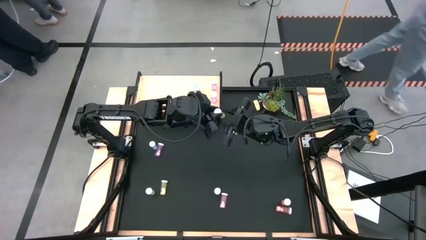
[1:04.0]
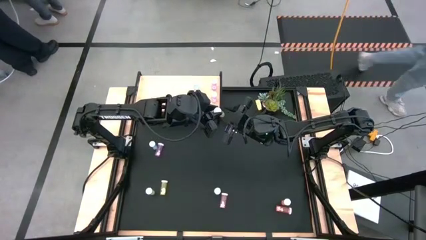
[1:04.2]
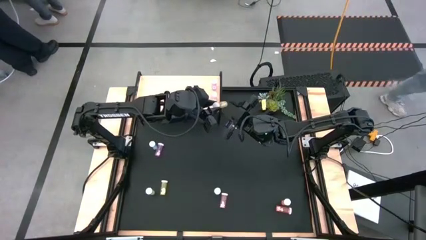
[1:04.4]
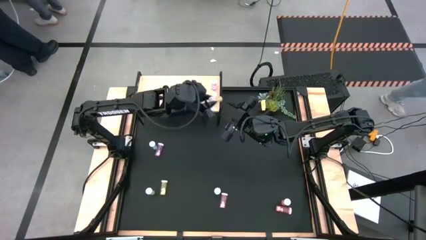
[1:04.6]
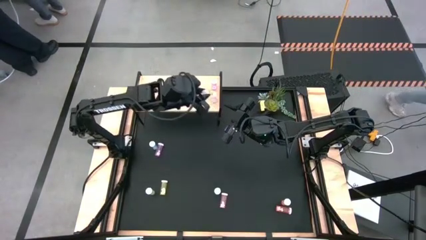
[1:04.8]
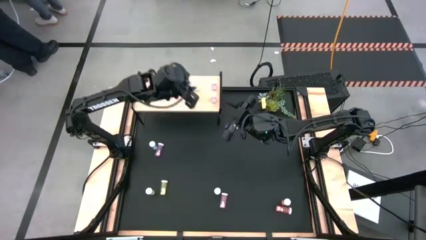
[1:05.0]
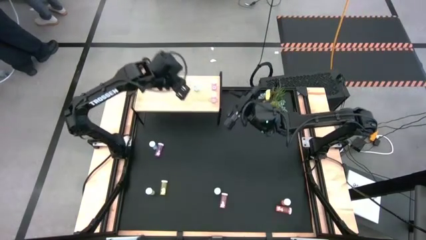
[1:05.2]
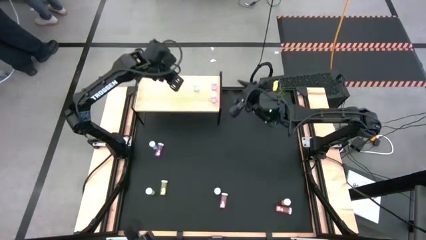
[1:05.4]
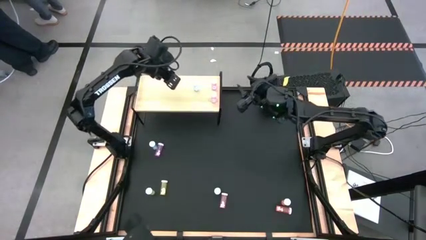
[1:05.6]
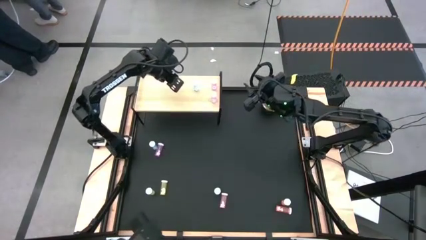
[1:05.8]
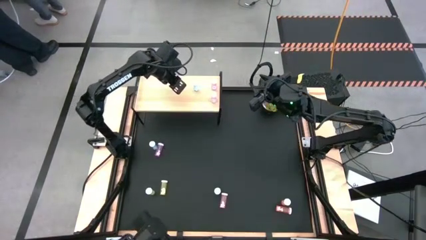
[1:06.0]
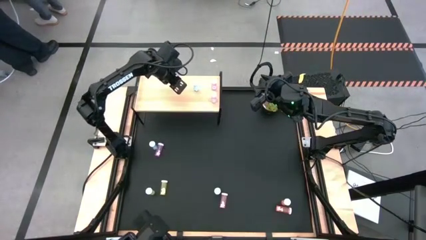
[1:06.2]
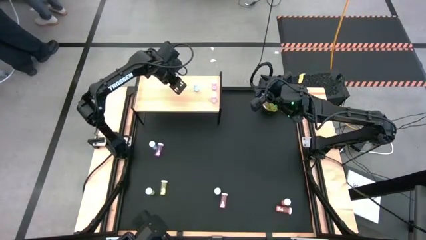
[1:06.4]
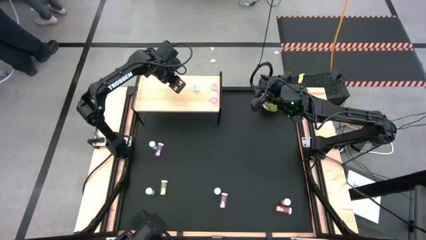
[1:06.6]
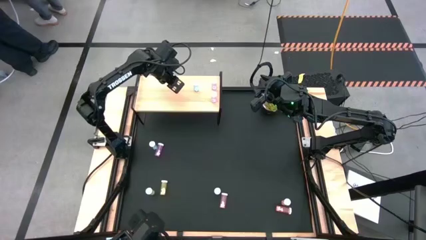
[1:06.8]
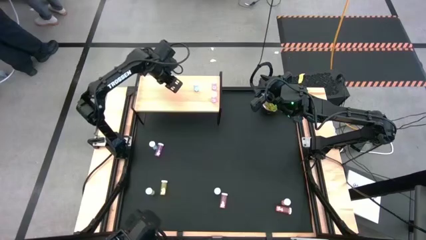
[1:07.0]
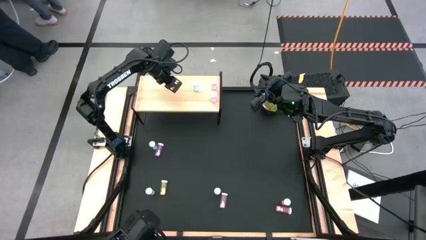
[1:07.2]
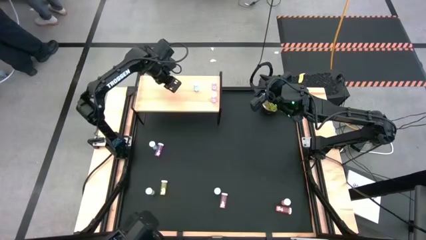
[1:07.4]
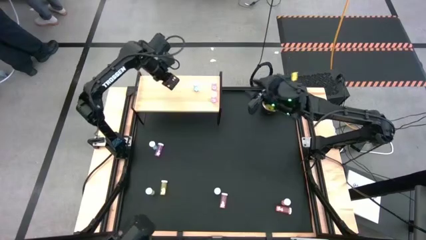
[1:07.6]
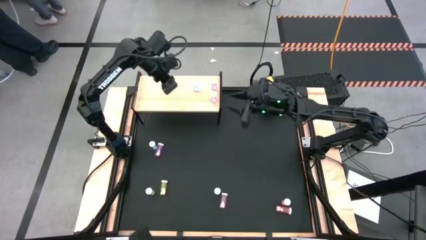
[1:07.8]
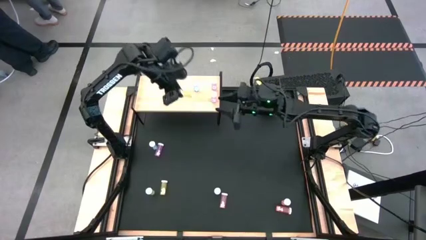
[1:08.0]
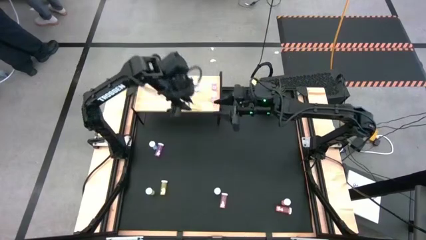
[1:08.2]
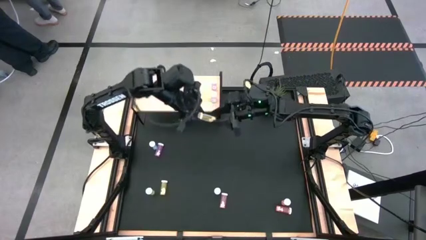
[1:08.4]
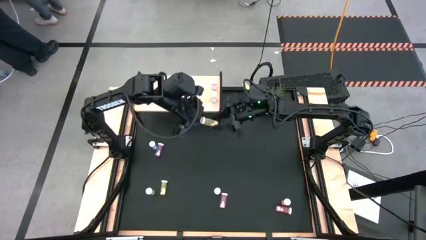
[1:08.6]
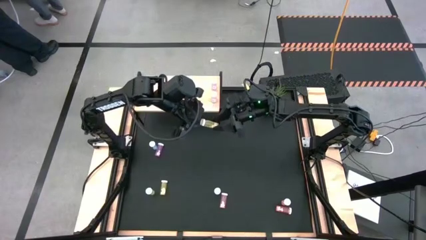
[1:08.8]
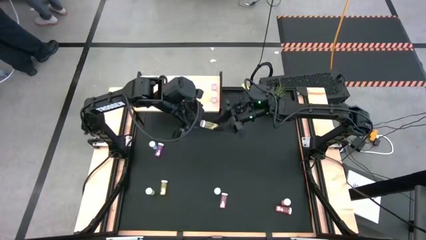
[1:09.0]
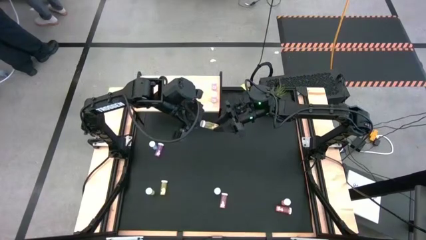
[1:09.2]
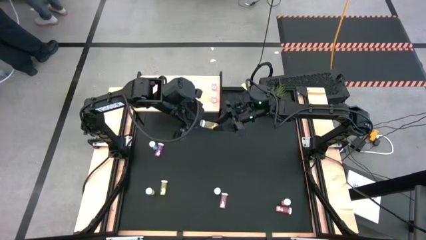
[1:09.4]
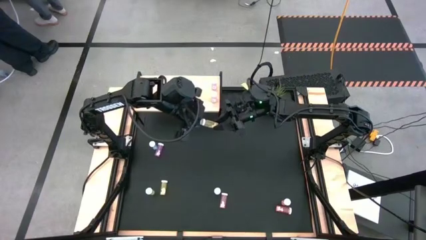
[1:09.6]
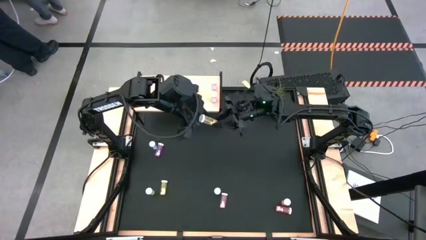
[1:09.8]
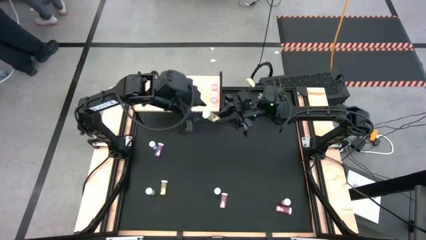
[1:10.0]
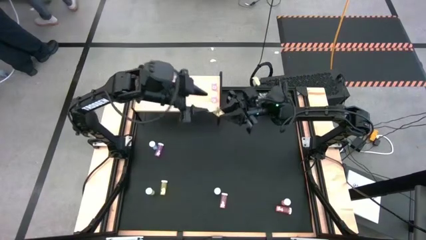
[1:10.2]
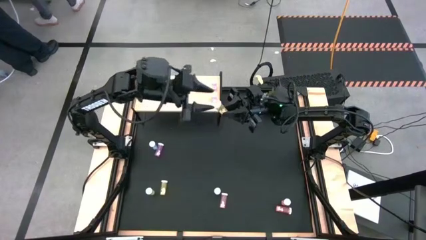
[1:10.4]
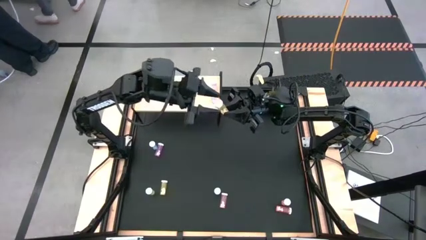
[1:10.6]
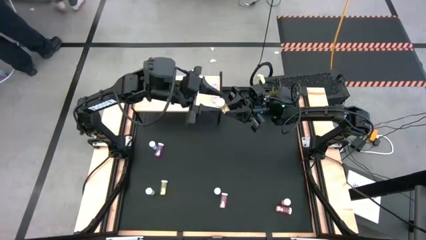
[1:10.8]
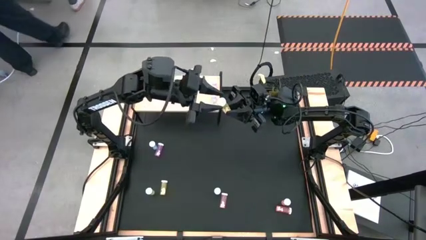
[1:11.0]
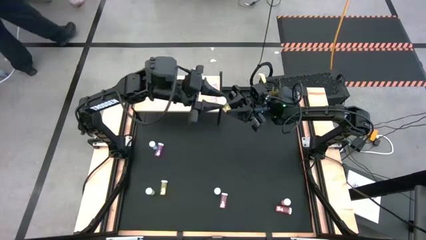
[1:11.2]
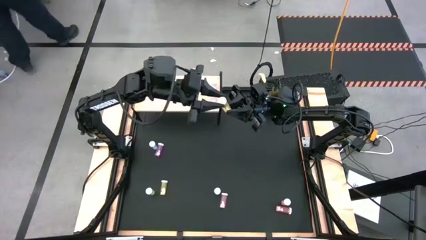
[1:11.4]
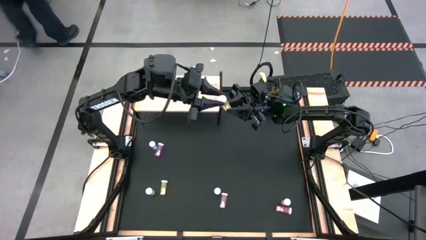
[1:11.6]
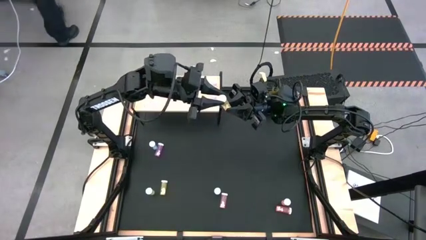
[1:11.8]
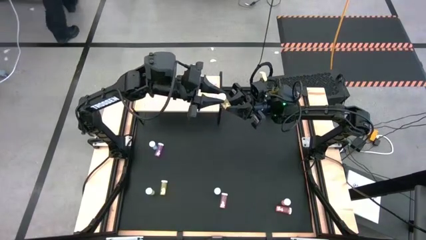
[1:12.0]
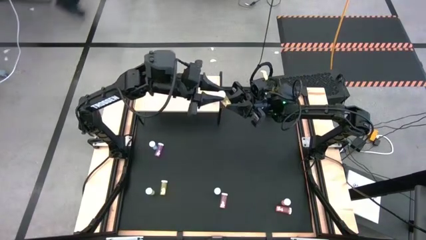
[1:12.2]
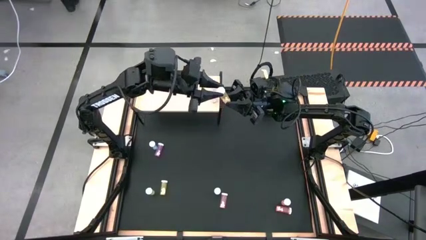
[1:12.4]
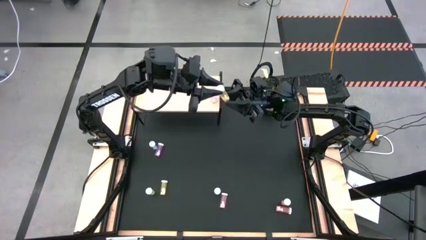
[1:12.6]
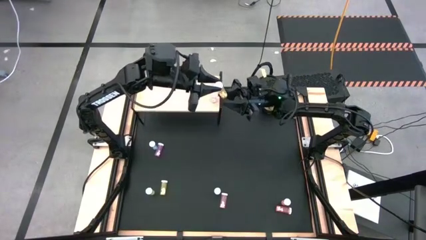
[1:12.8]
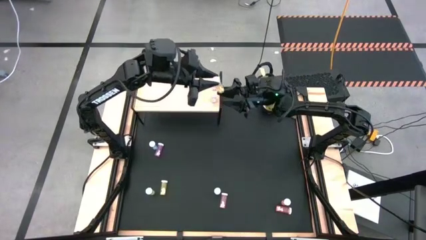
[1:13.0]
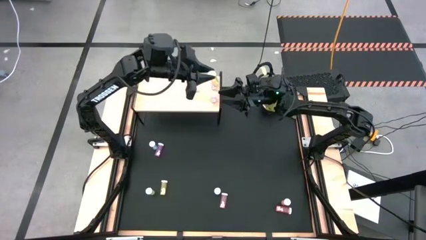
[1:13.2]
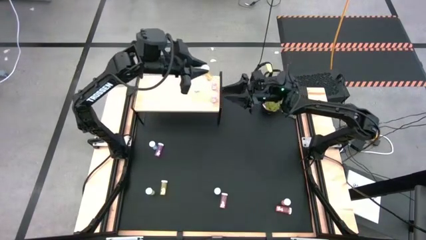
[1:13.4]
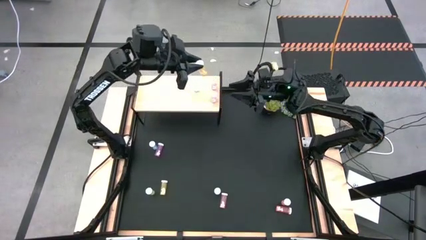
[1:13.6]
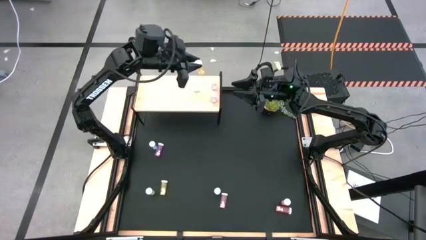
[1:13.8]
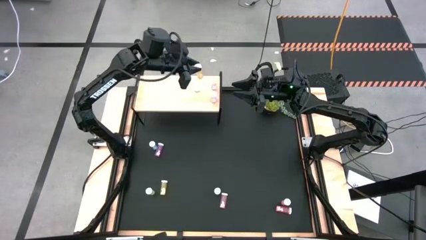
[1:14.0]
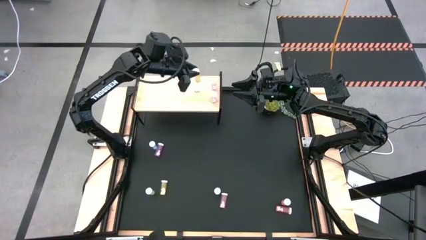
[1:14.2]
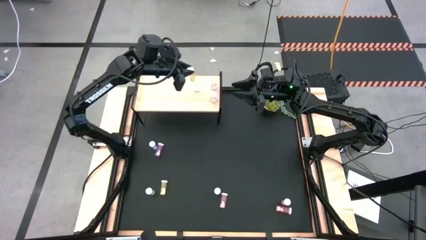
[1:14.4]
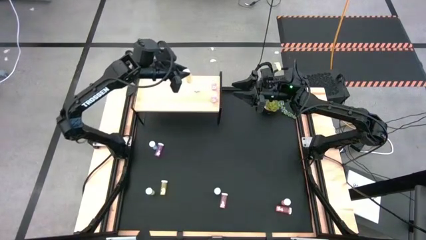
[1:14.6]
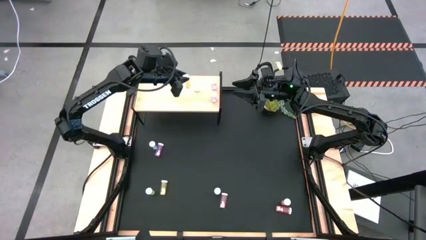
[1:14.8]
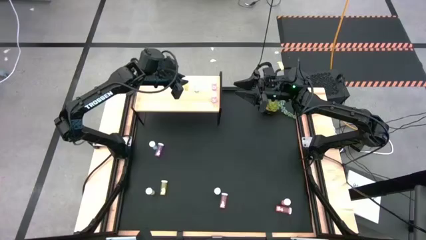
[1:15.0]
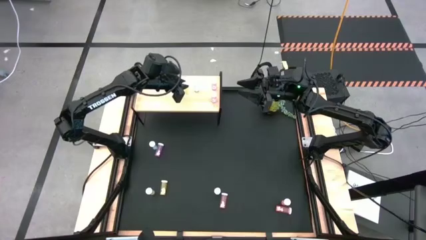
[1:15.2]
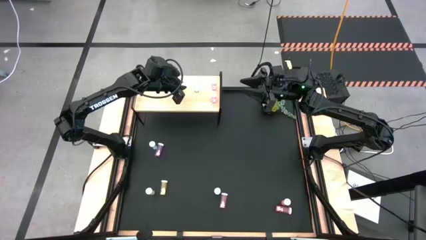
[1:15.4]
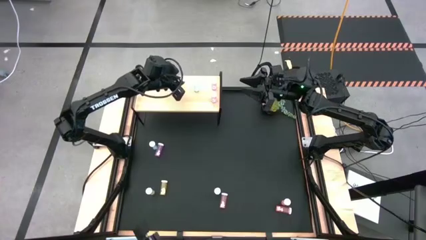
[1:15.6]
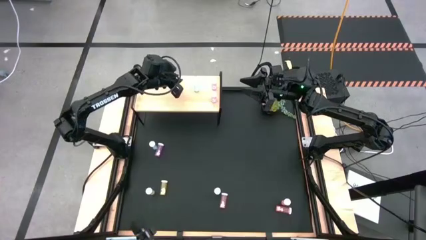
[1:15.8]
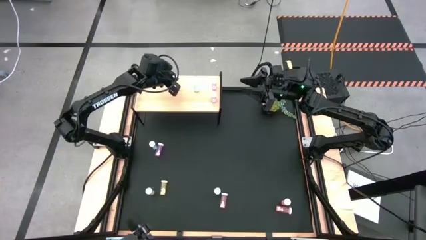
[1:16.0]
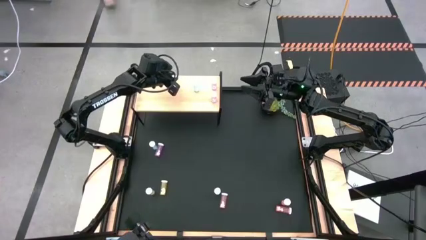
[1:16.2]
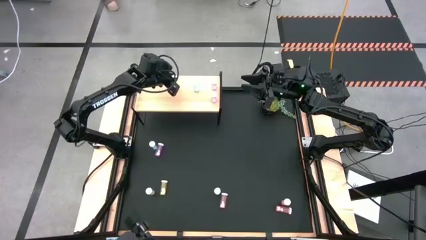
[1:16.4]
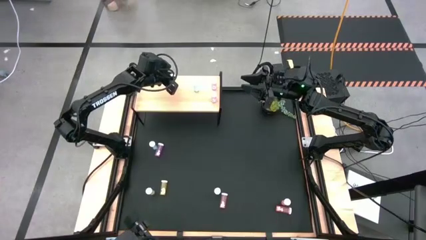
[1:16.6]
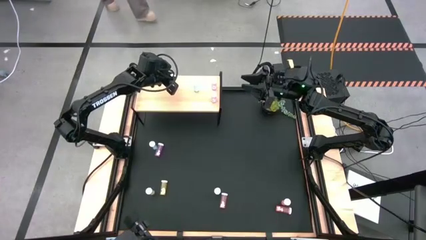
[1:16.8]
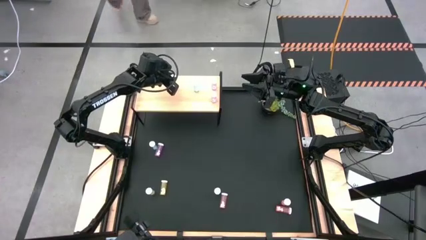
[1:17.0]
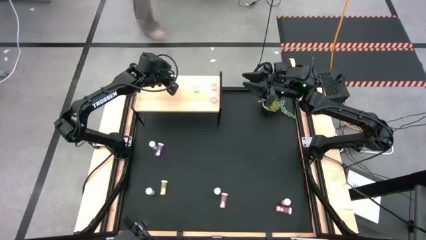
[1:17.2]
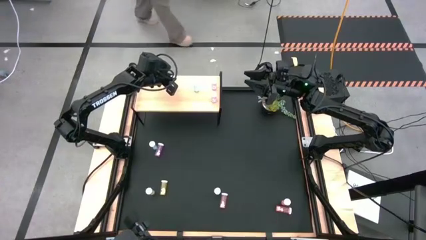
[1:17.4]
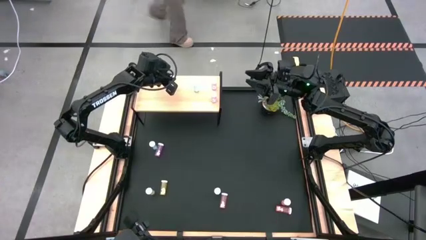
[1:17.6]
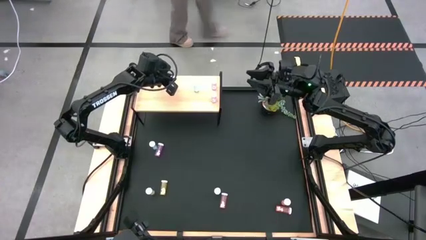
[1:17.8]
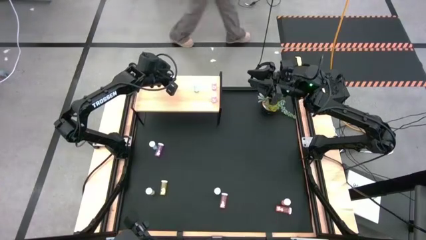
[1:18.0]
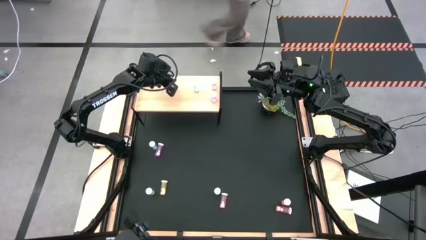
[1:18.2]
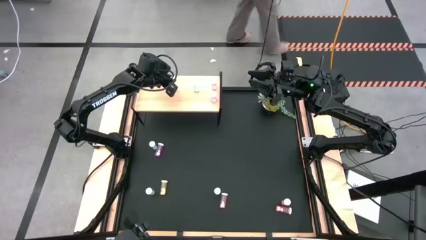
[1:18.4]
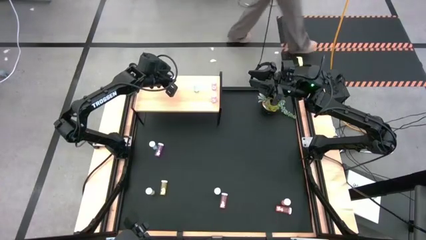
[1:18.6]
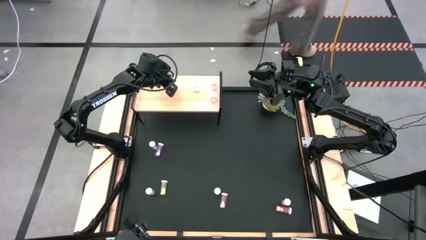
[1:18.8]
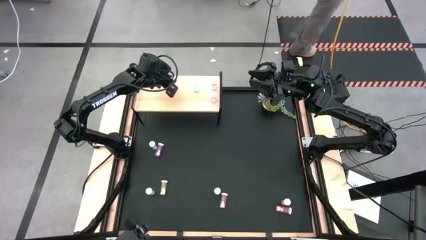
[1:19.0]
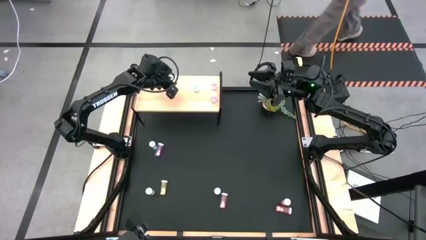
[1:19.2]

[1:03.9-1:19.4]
Task: Pick and place medicine bottles onto shelf by color
Put the top yellow pill bottle on the shelf

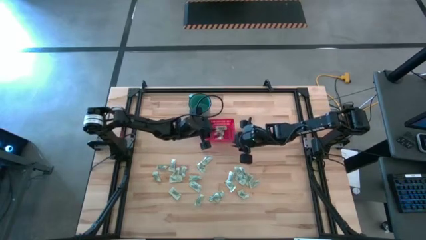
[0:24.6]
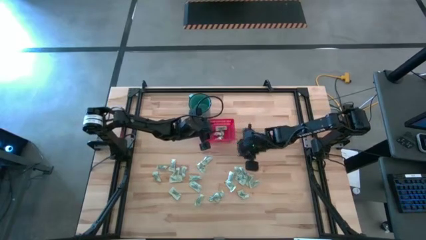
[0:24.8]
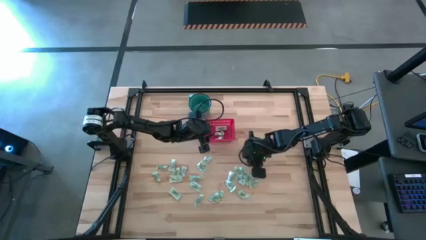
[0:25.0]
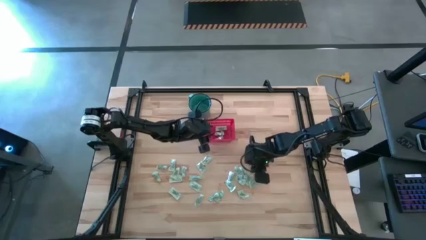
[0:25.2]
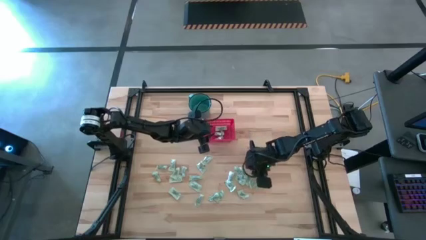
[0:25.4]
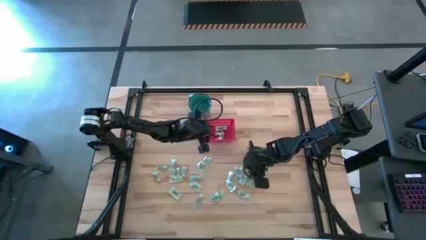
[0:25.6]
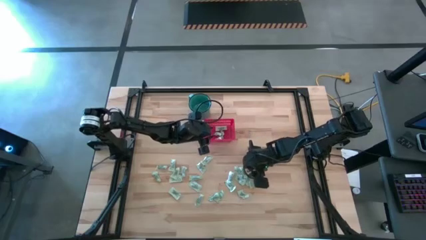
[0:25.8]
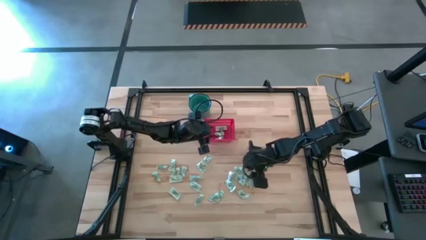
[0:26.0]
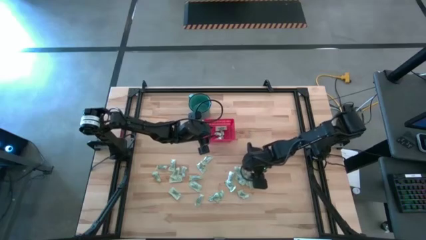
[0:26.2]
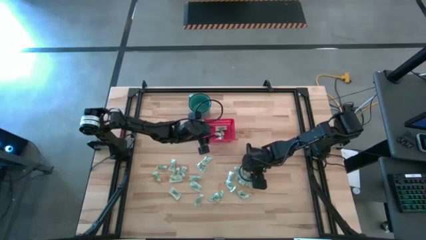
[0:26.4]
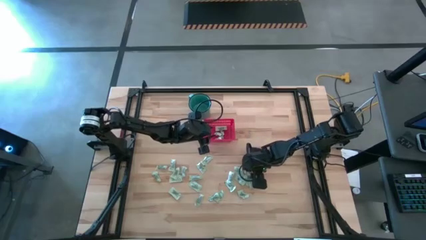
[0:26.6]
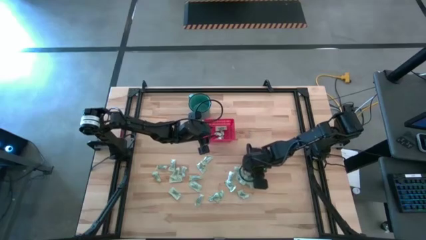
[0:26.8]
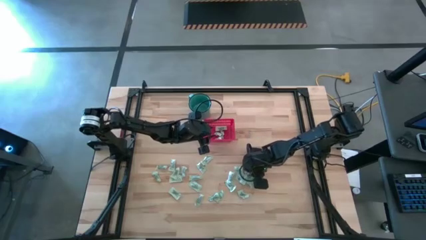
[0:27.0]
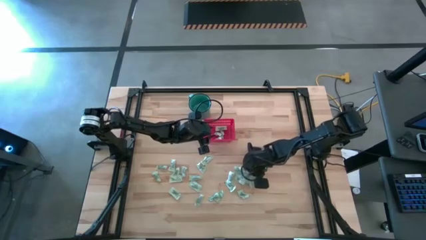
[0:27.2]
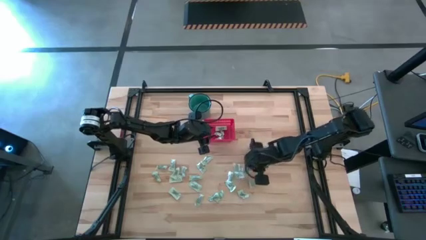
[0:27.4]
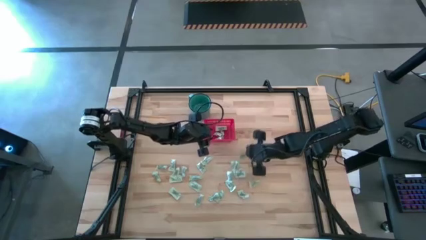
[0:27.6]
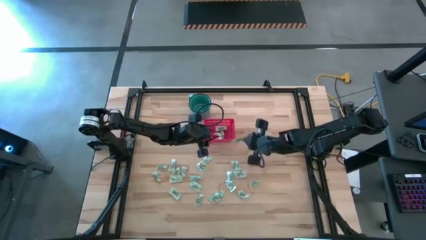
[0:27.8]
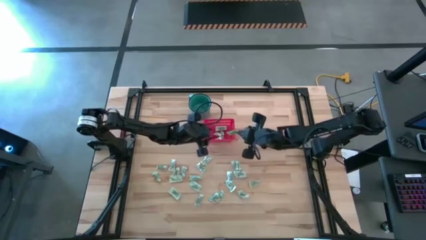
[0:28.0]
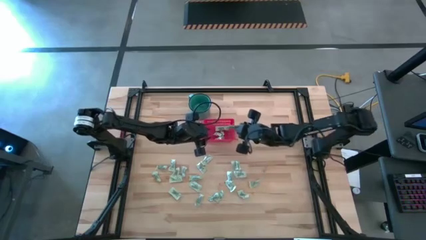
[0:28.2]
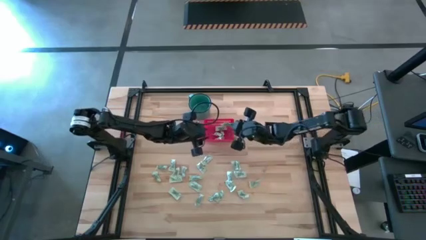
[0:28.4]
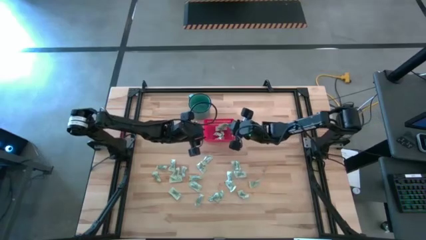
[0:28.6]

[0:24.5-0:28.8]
Task: Pick and place items into bin
Put the light green stevia packet into the red bin
